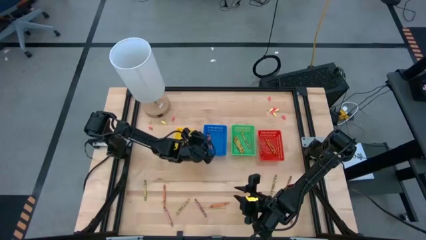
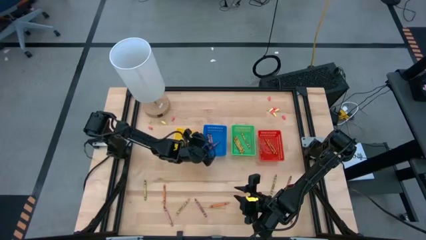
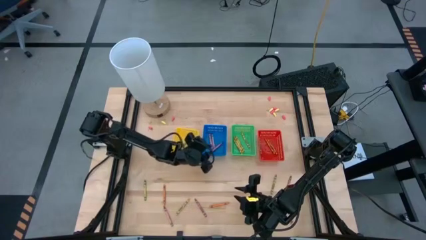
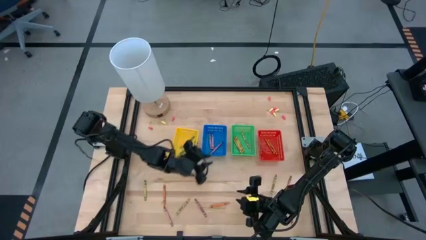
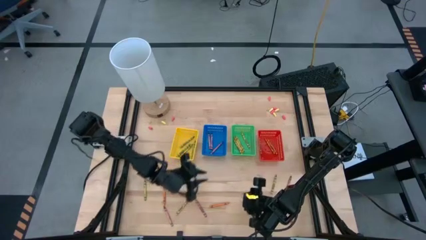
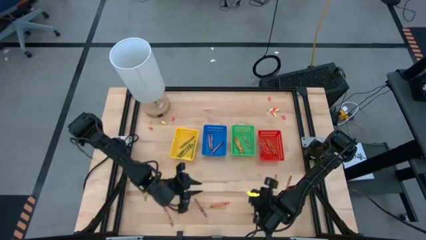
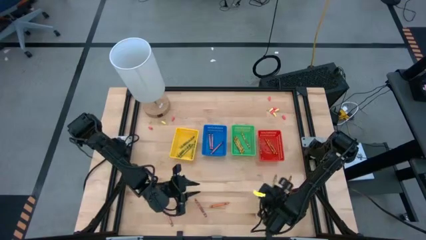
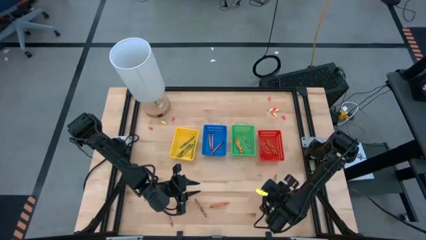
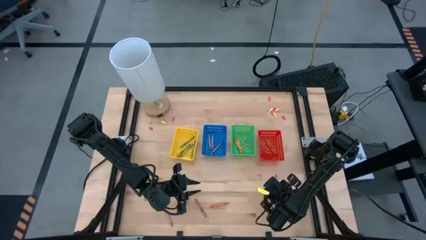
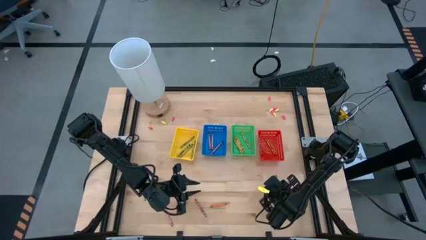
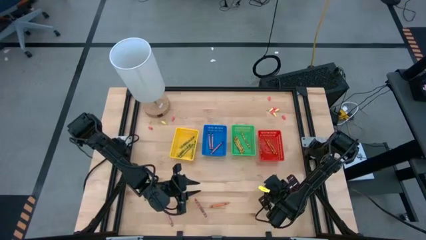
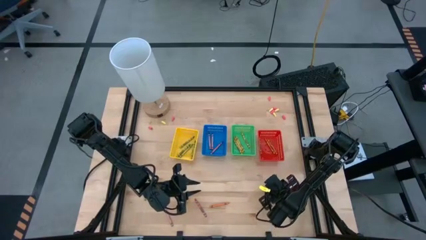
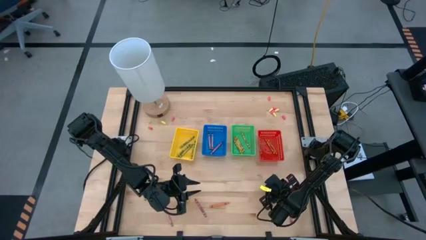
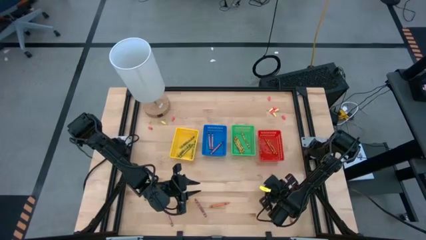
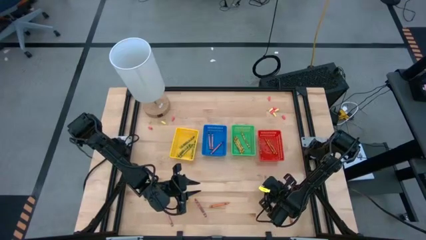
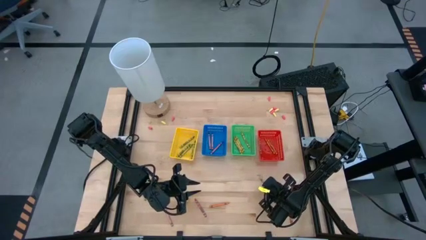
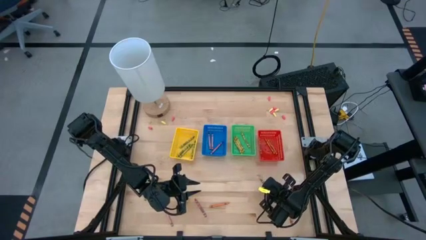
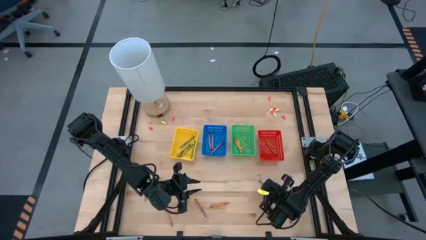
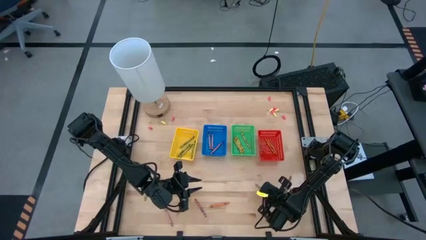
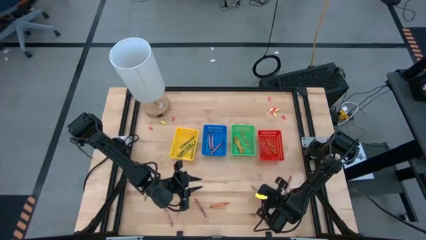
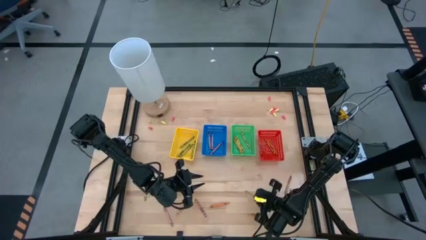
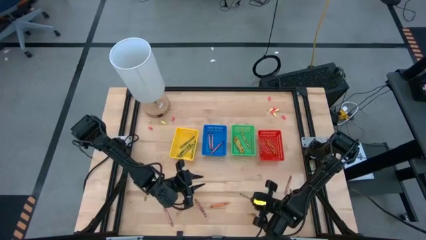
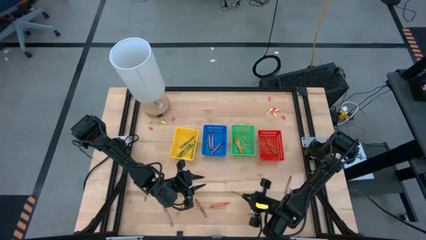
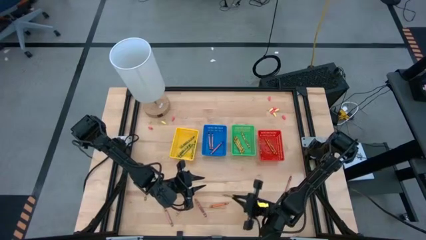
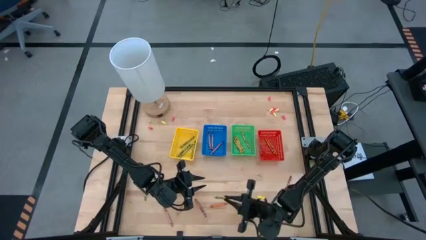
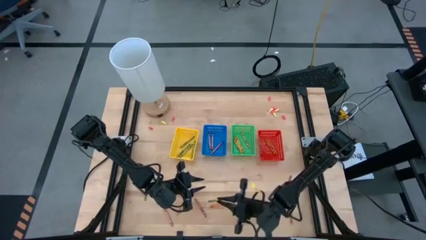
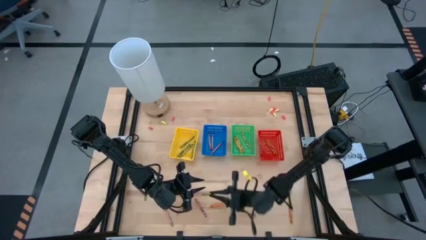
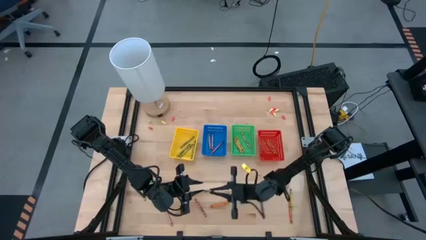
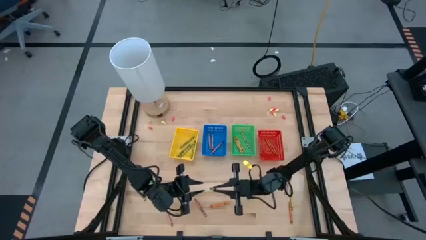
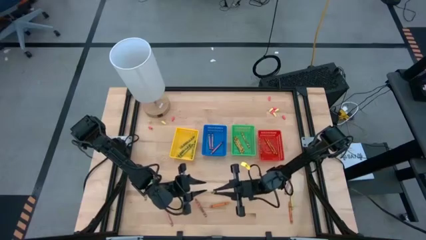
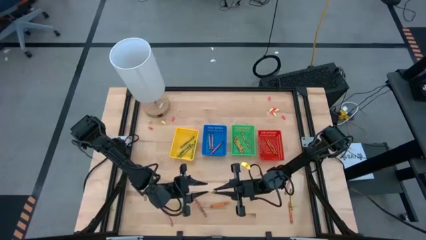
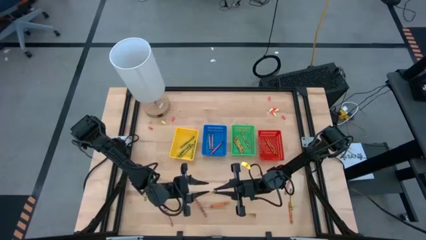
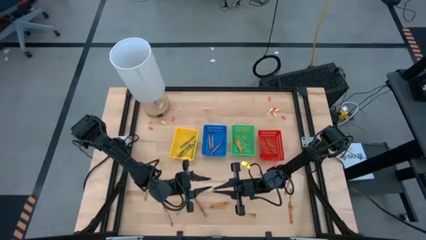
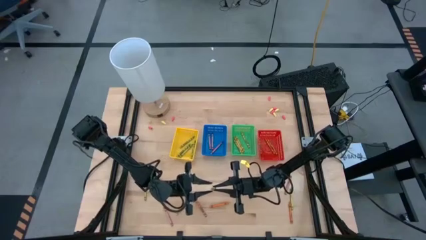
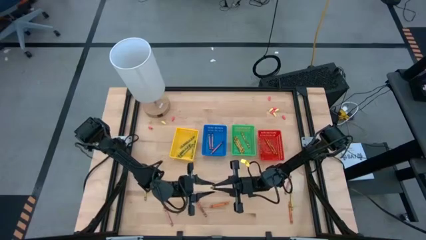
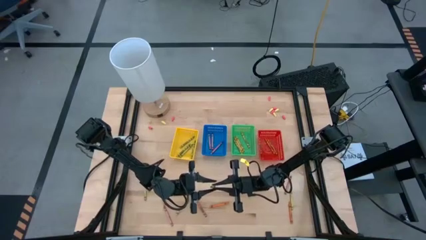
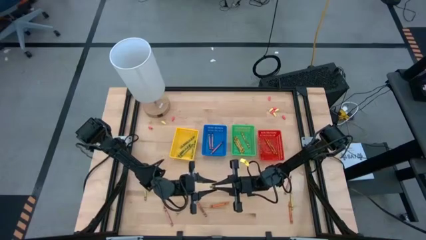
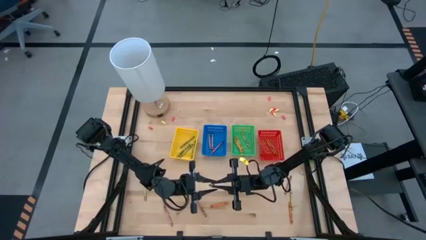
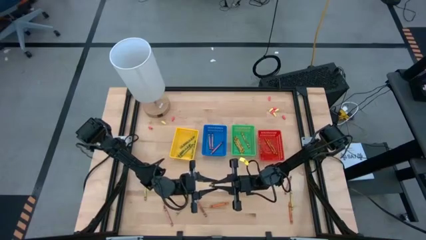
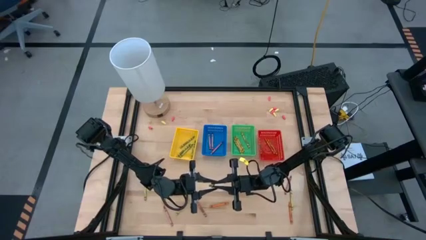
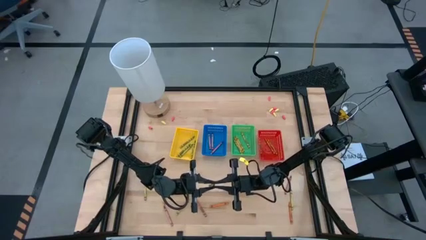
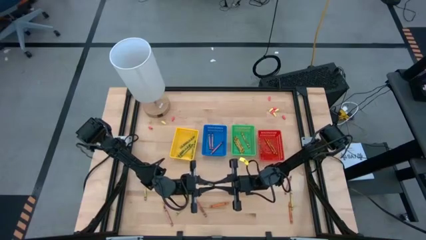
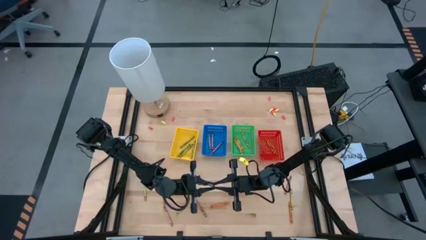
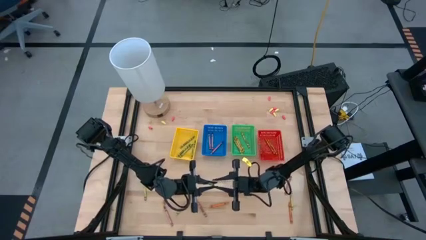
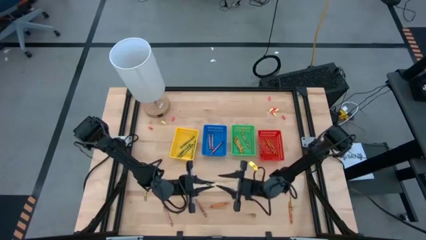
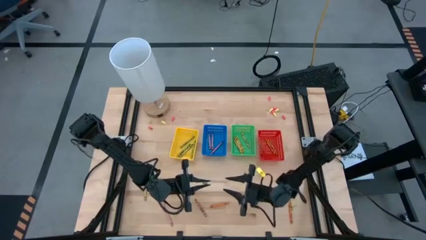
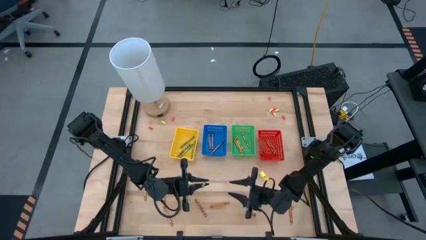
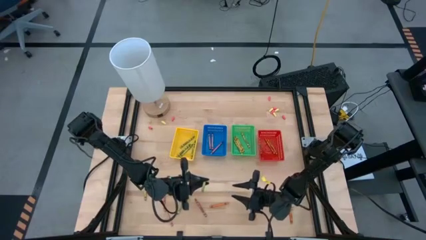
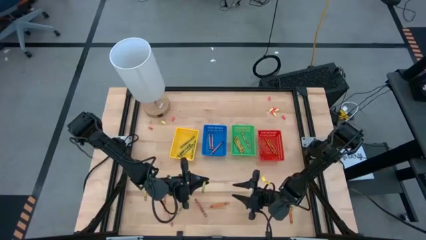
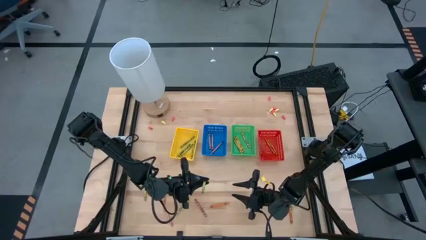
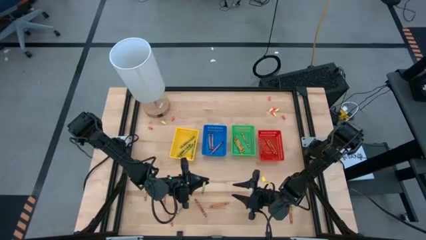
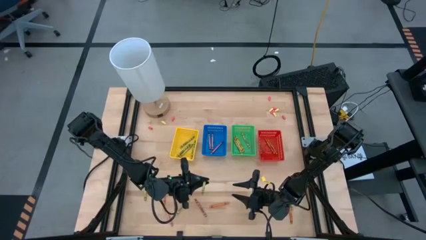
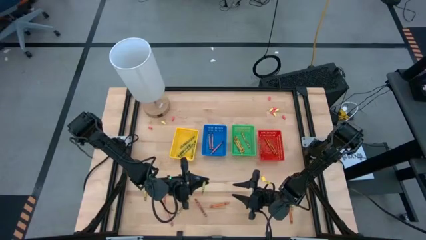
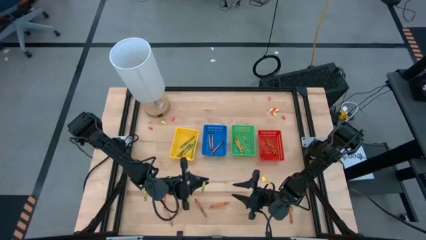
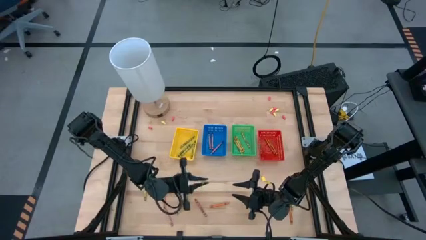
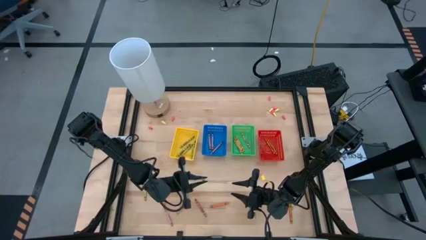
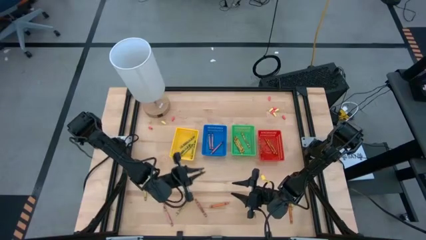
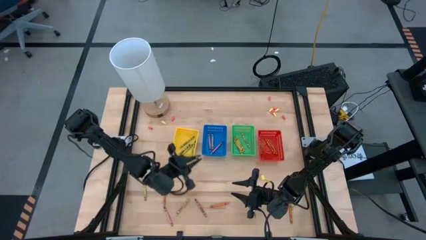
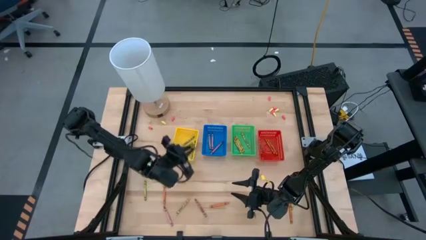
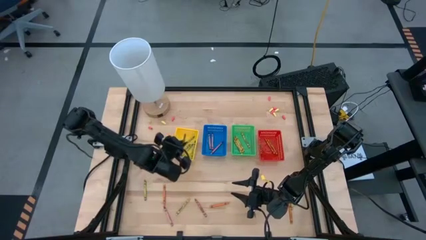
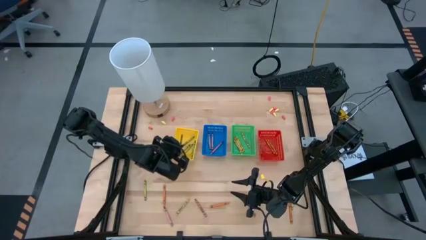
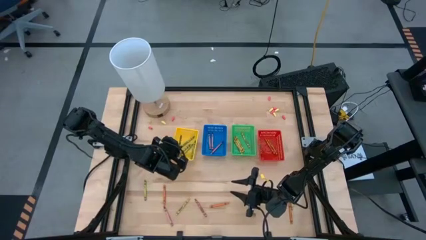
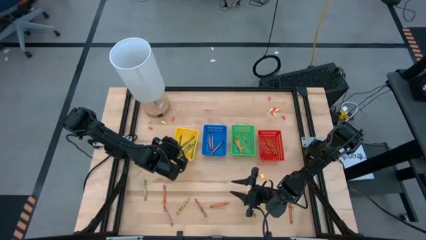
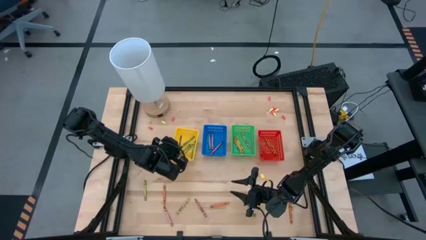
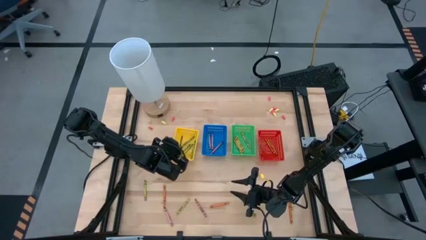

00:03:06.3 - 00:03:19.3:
Task: Sort crayons
Put the green crayon into the yellow bin

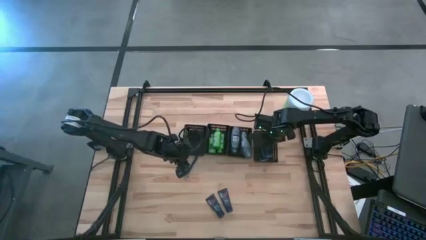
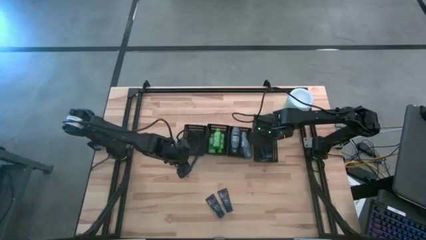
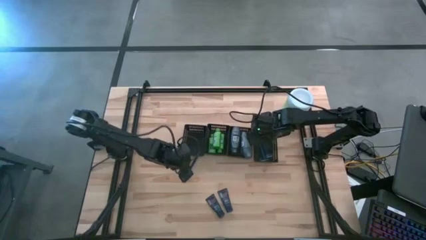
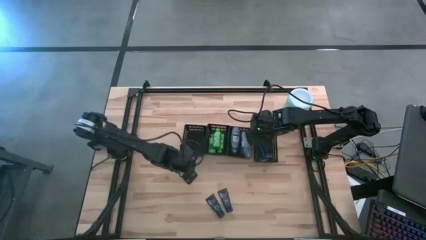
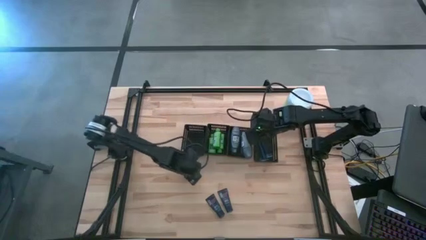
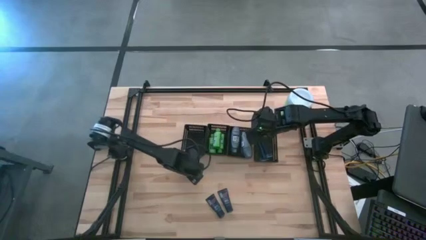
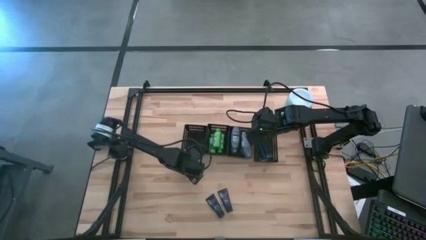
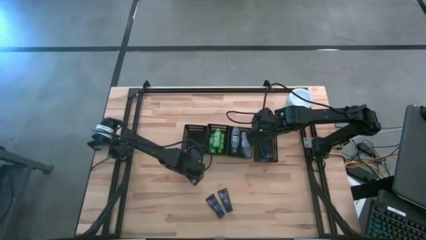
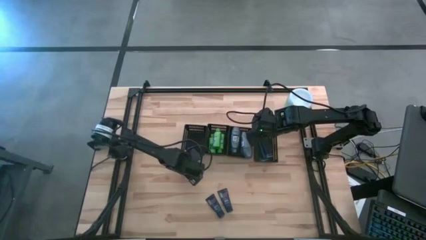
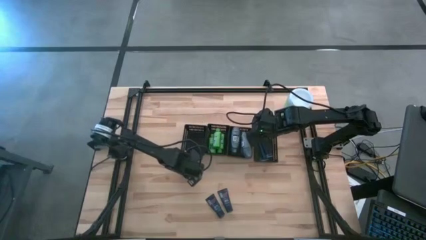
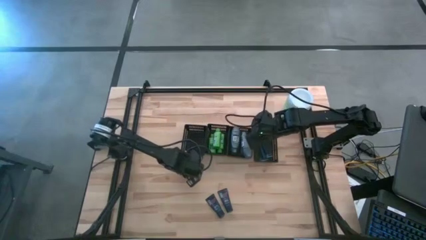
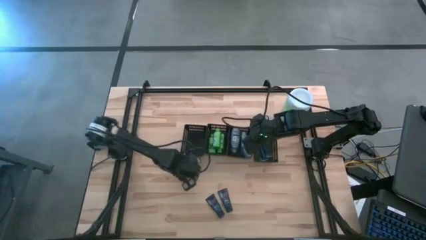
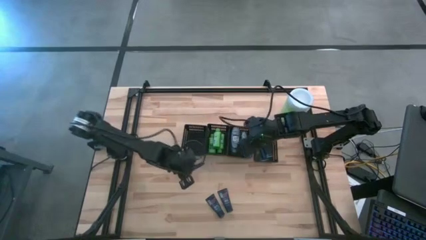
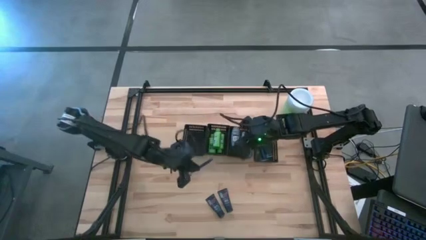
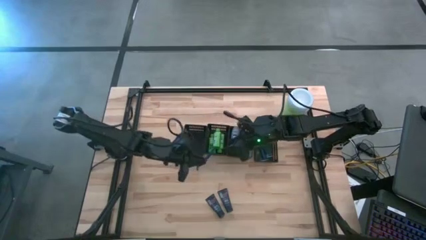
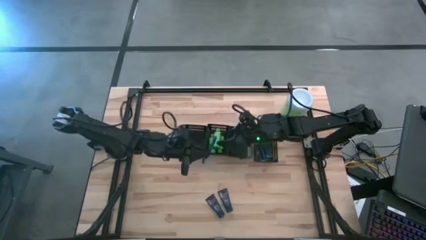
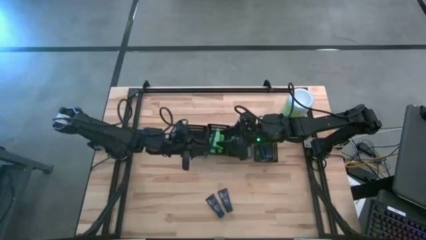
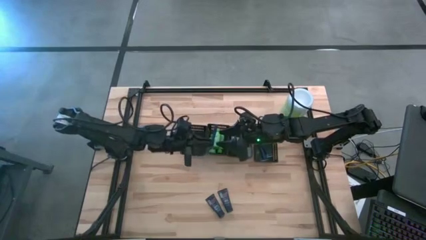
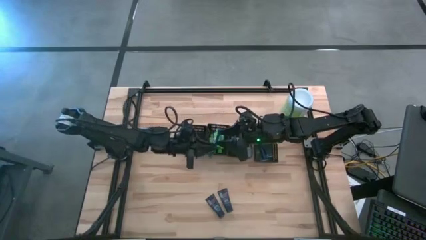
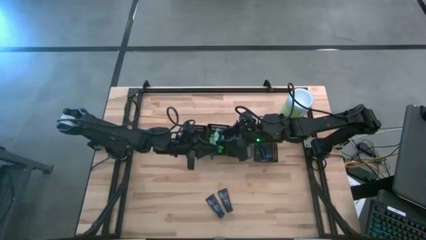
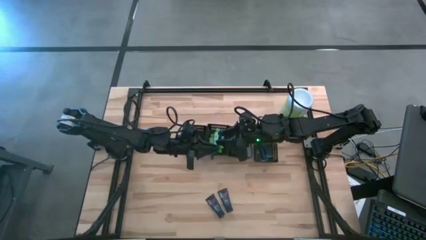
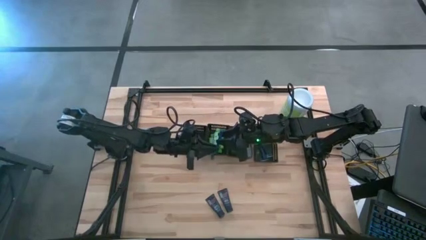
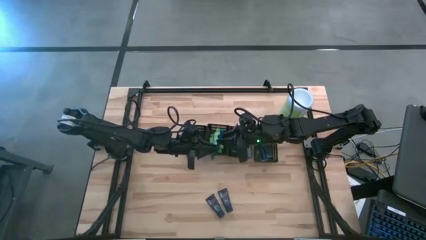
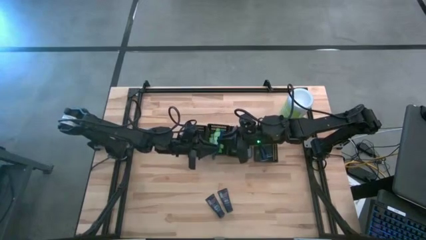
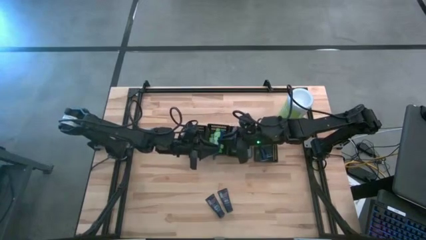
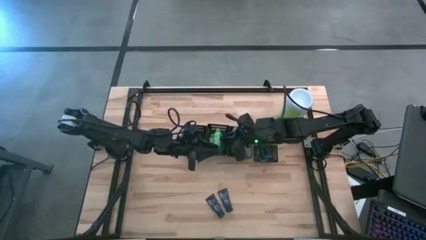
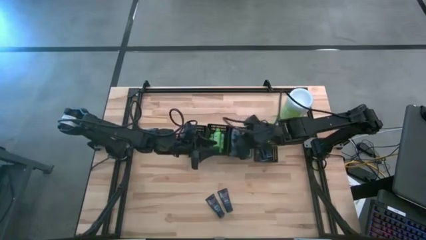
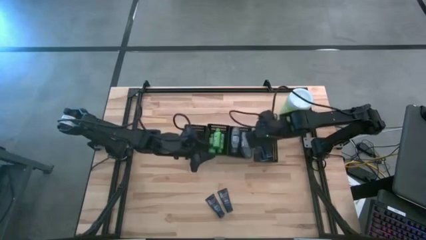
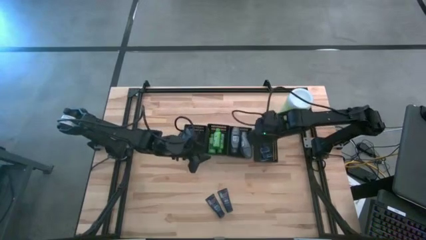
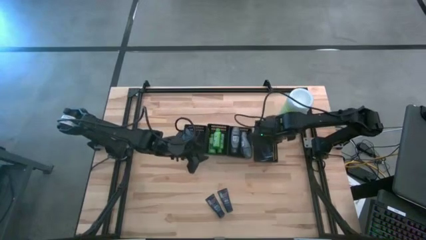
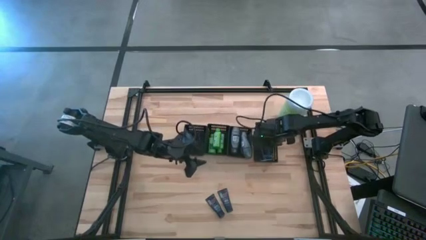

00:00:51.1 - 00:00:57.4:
Task: Pick & Place Travel size toiletries
Put the razor into the right black bin
